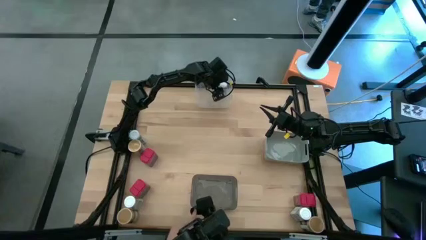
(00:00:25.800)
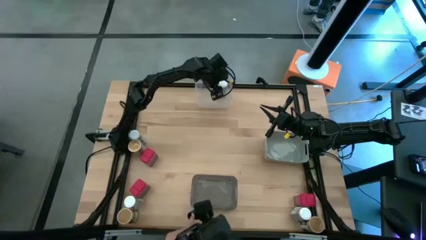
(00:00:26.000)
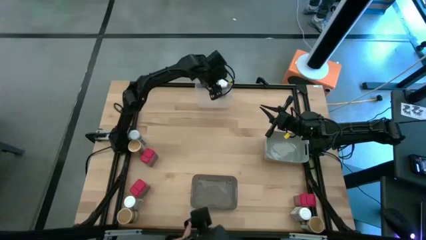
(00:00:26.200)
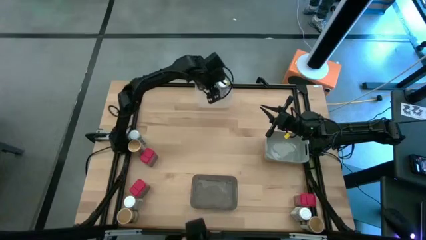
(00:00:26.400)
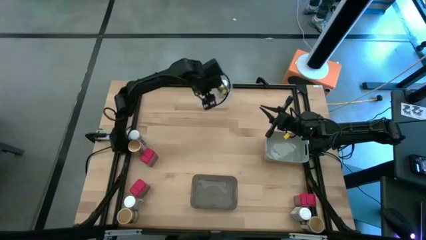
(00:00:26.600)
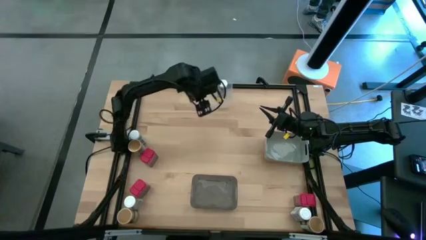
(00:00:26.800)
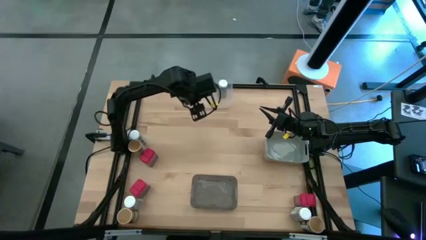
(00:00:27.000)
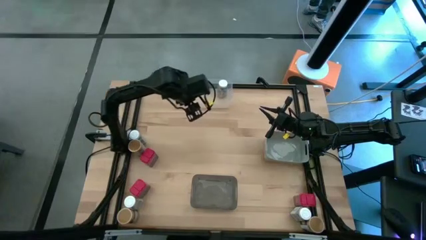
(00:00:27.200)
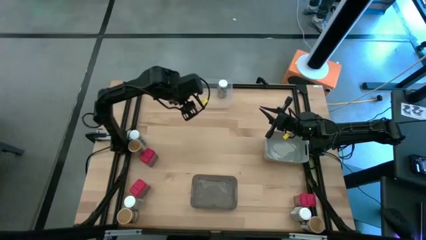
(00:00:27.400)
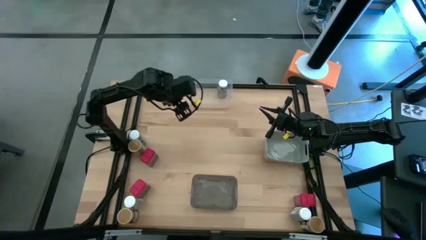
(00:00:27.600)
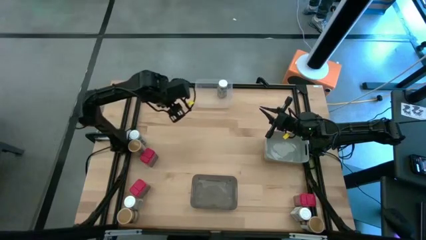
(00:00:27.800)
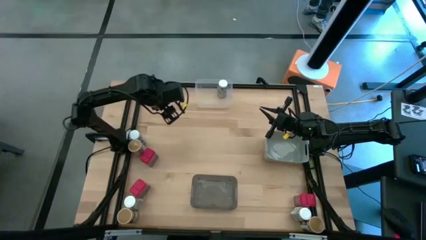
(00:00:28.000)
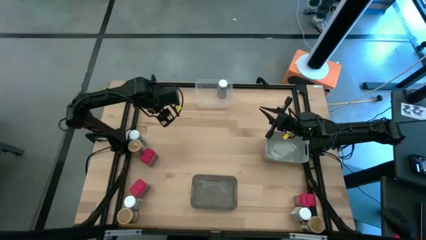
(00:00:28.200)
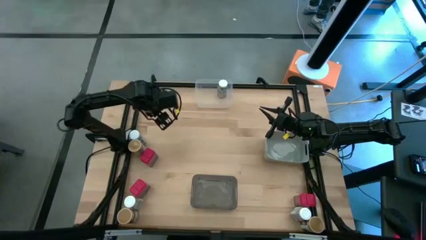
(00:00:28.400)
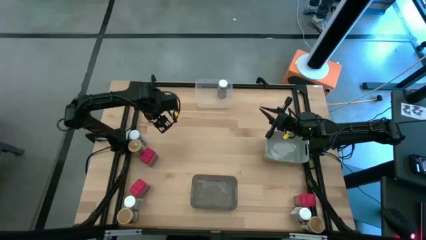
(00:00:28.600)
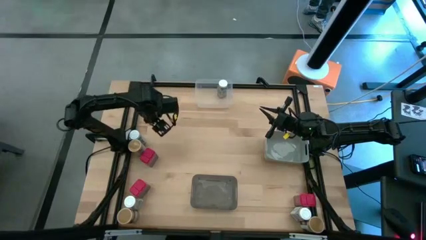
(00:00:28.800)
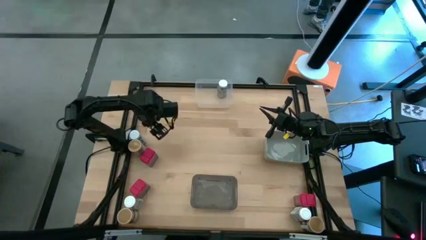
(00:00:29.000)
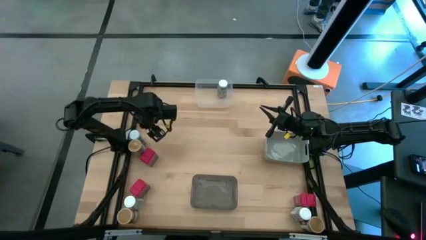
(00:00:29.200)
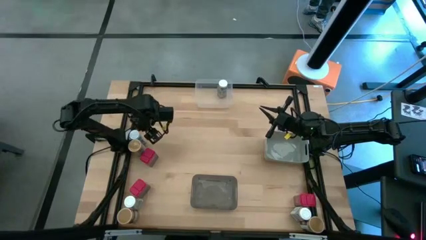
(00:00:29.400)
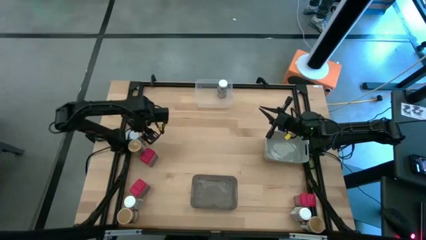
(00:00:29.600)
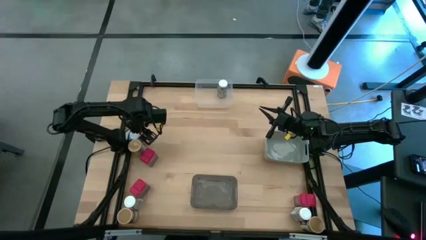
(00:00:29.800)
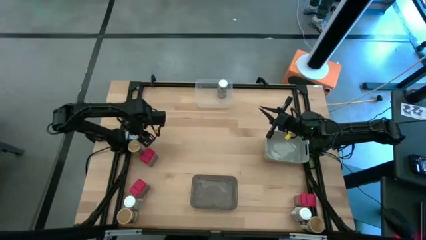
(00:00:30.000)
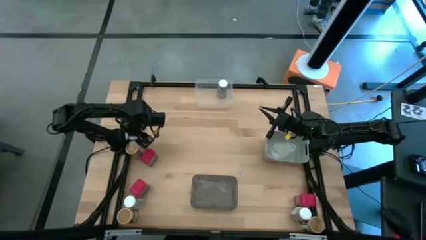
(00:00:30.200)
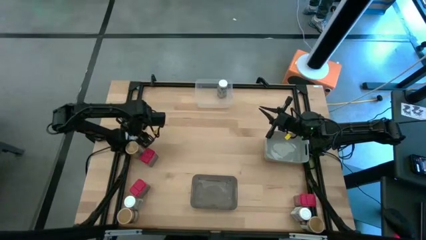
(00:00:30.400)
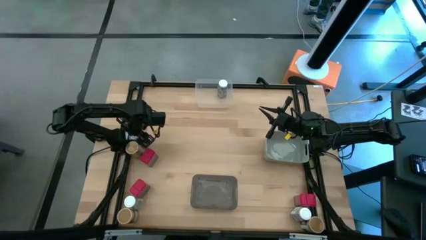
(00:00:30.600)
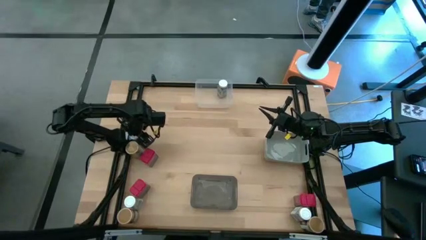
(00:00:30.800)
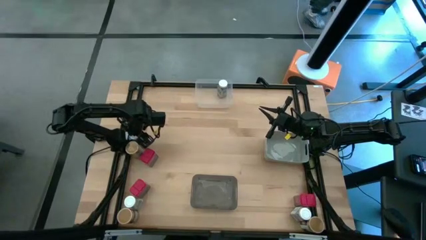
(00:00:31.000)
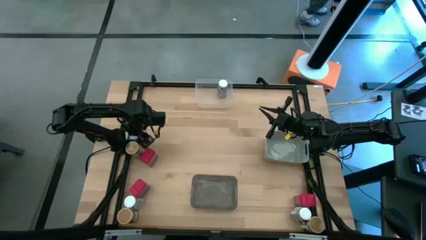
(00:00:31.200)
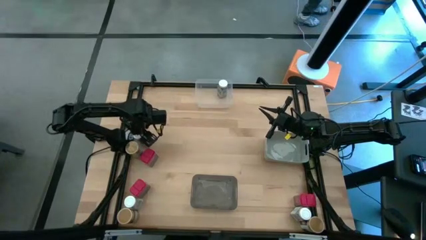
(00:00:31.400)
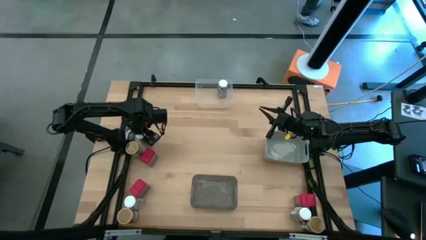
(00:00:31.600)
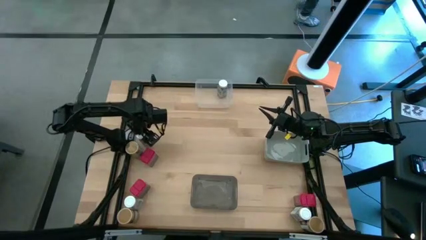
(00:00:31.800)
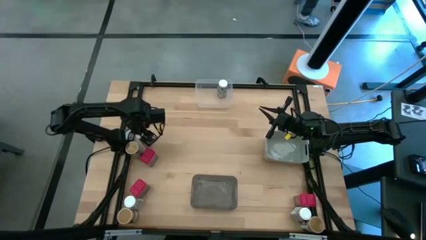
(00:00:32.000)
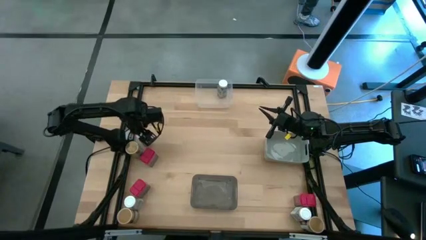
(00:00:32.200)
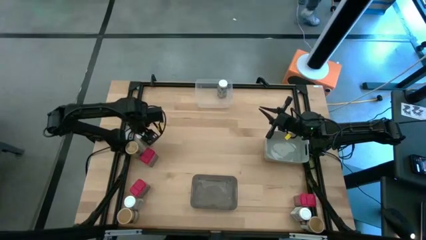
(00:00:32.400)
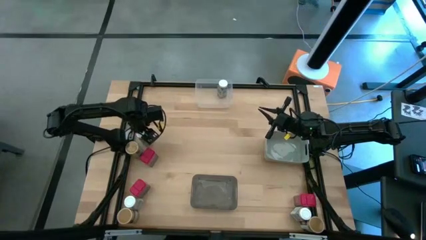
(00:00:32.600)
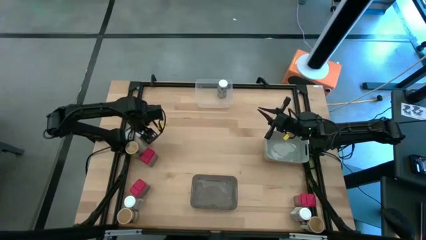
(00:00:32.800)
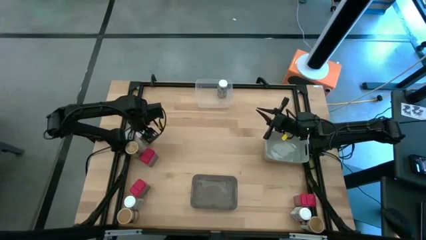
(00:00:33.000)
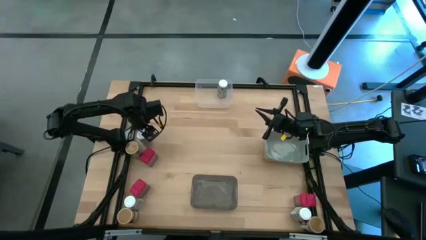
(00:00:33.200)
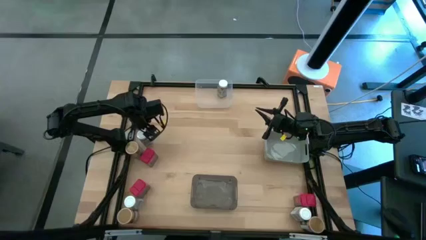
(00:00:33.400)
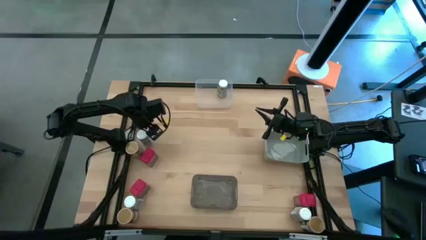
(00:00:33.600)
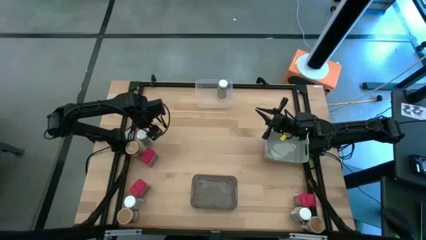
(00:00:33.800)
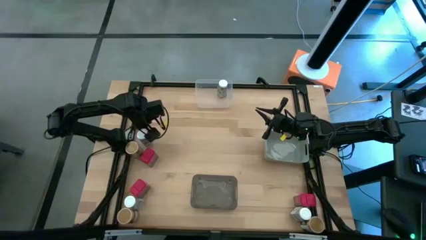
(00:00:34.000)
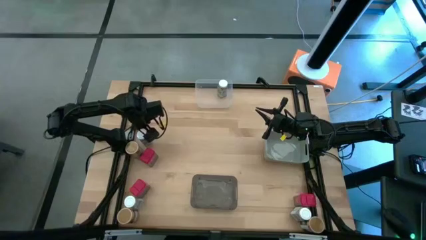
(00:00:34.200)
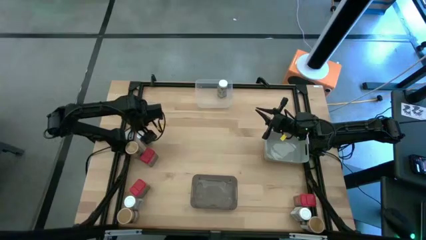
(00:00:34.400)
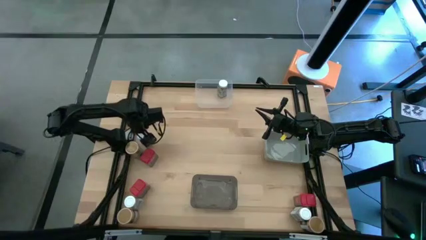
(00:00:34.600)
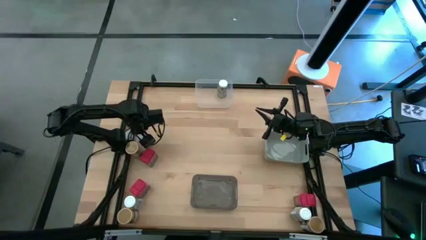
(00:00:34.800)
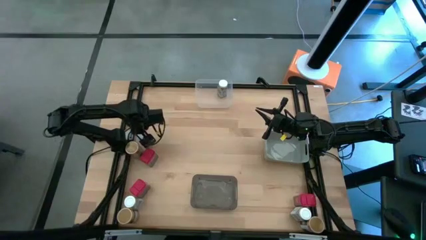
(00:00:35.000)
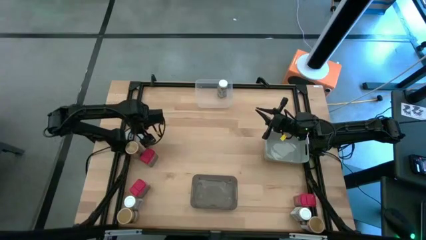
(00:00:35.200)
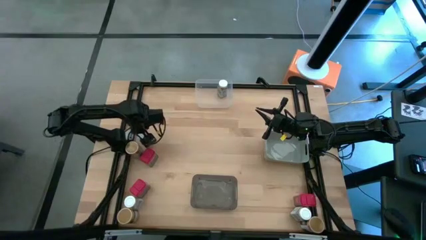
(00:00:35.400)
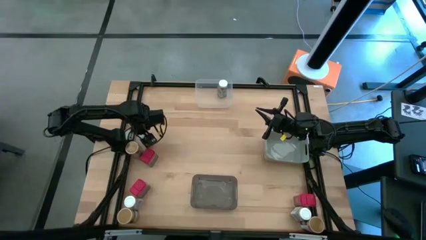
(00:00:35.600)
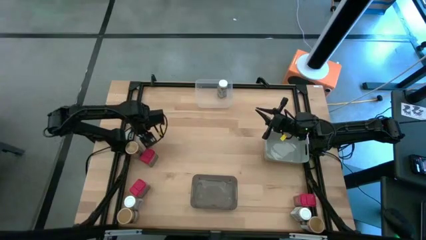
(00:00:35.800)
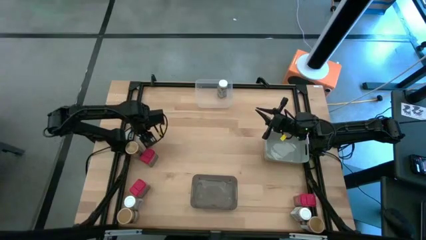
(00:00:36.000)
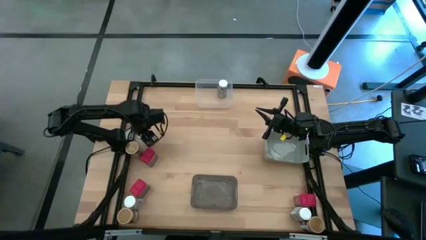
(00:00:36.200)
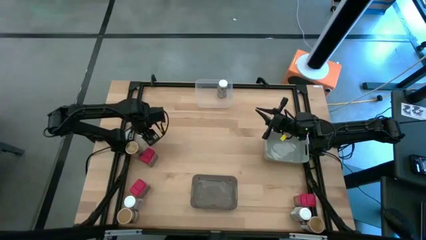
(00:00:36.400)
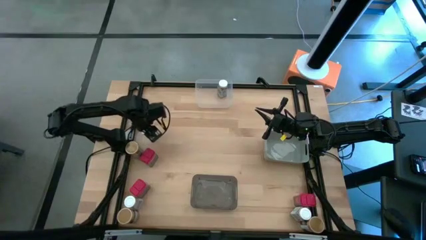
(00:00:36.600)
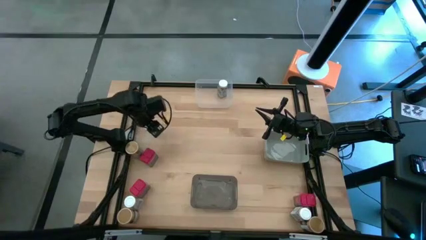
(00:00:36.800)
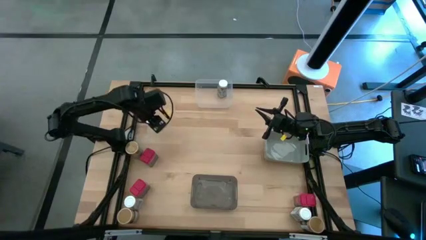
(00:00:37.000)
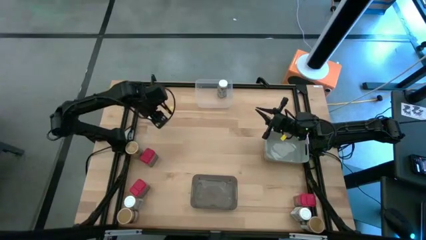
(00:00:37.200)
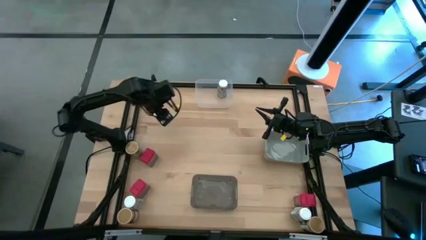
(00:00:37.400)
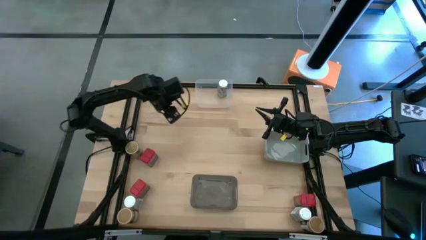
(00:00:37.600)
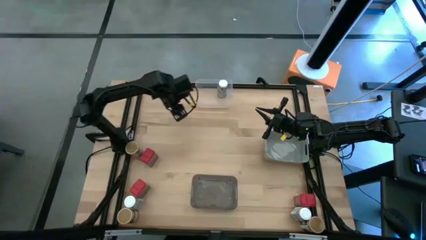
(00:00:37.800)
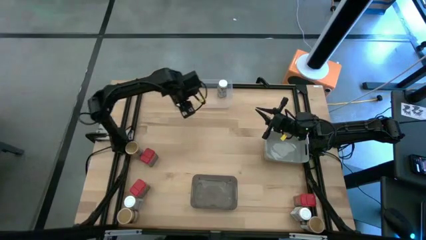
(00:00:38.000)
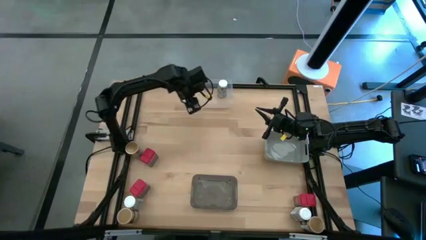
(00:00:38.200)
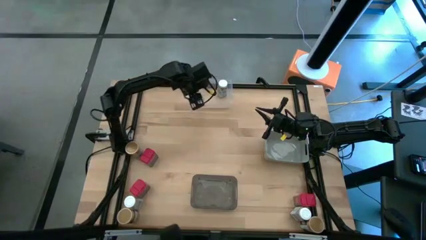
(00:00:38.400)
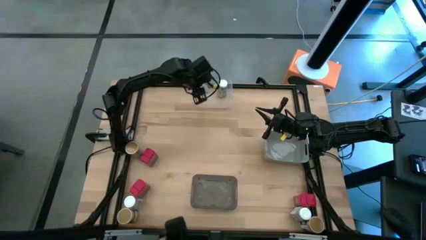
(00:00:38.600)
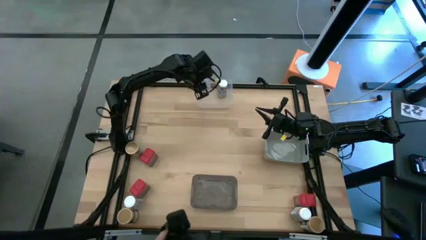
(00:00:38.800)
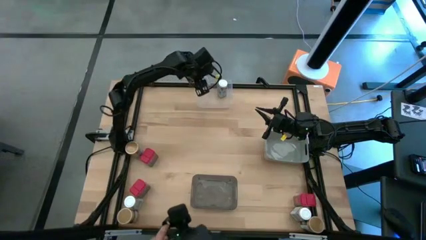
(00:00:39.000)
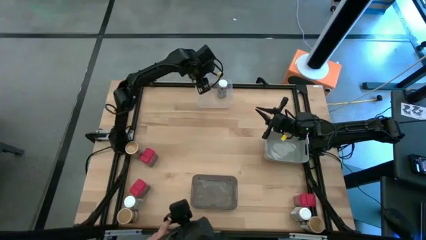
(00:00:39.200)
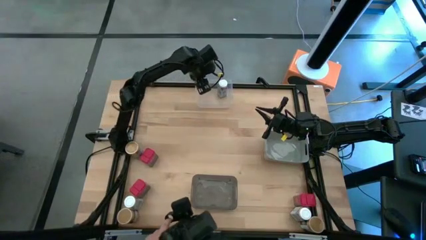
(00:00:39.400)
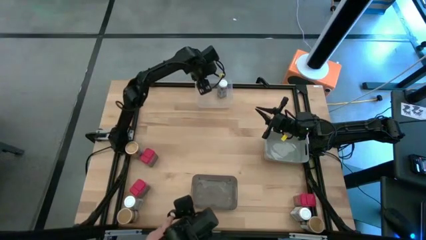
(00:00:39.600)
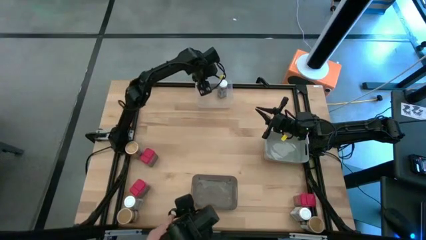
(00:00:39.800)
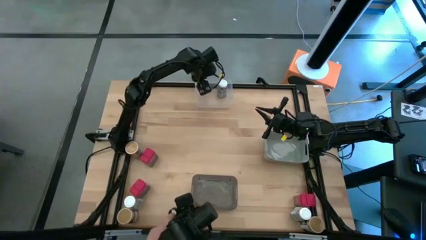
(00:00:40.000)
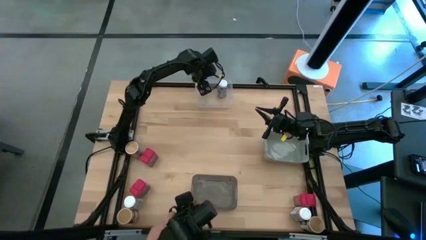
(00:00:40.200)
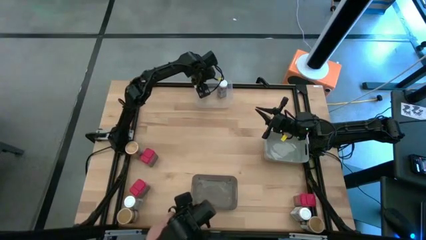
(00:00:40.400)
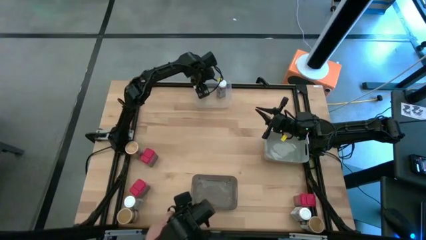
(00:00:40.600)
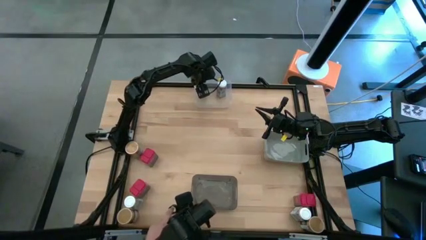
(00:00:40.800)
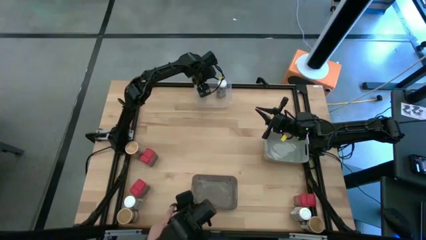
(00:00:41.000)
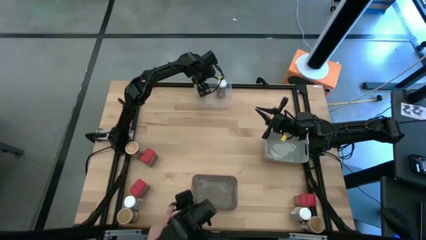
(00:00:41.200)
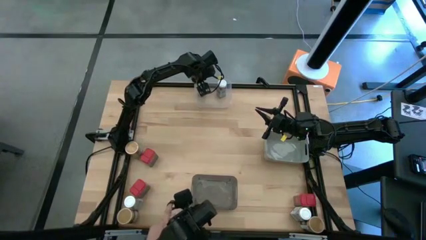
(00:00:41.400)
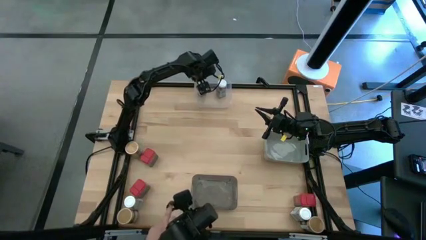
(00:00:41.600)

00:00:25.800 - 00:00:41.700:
Task: Sort spices by type
Put the white seasoning bottle into the transparent bin
